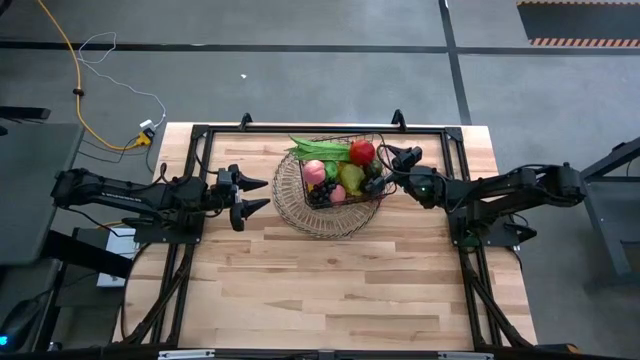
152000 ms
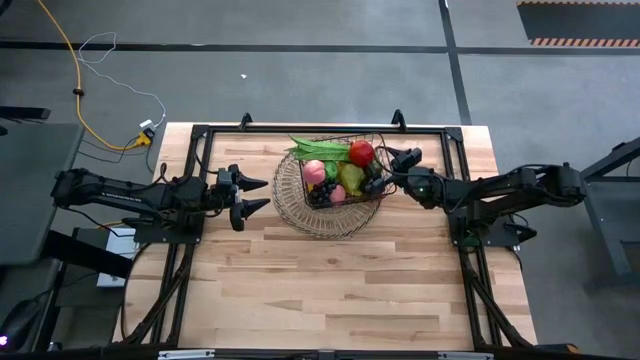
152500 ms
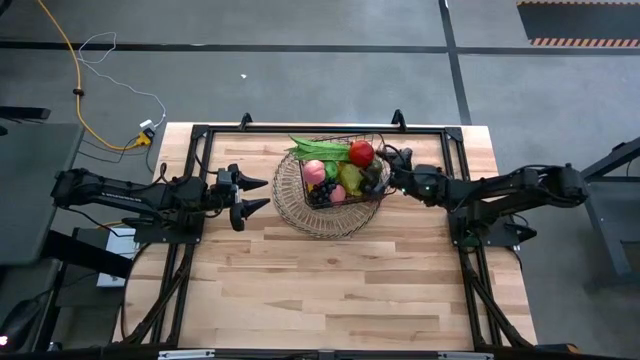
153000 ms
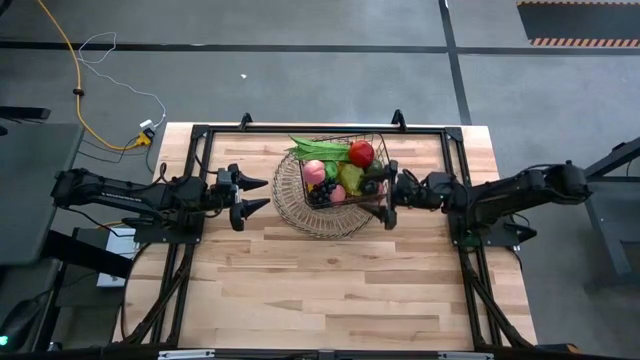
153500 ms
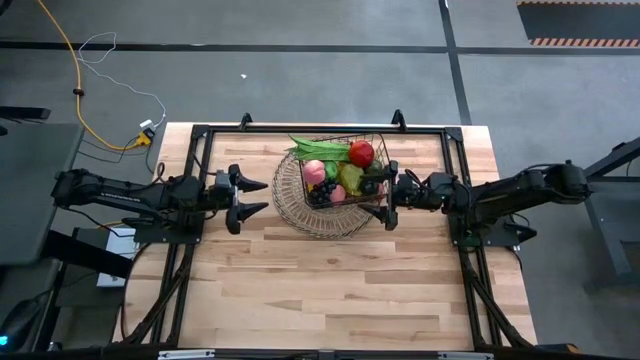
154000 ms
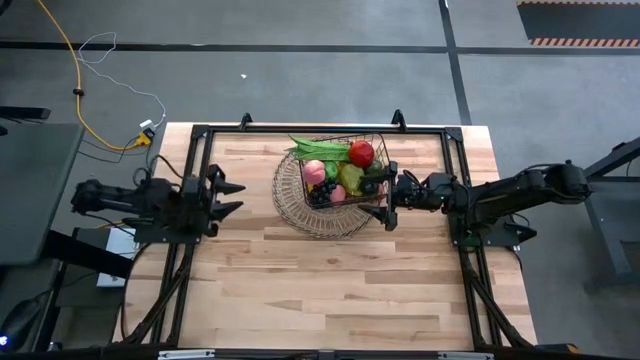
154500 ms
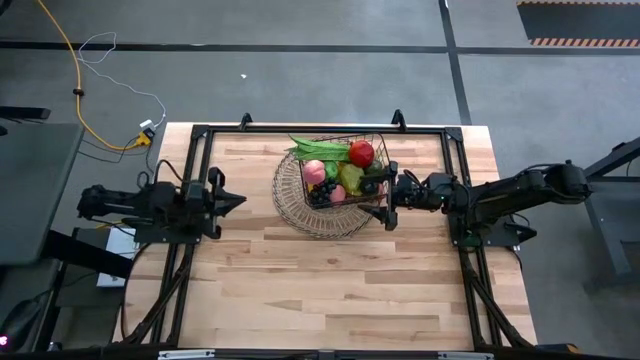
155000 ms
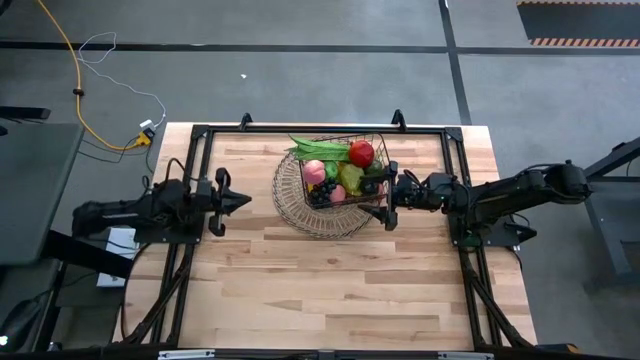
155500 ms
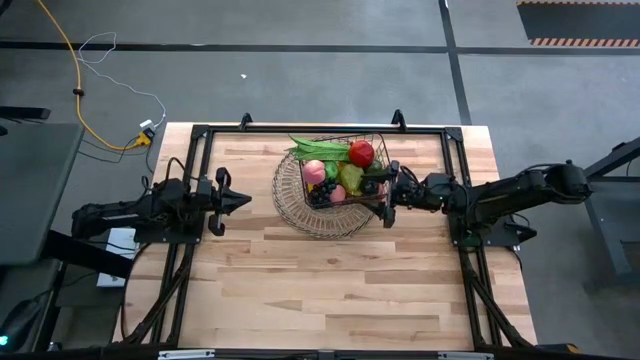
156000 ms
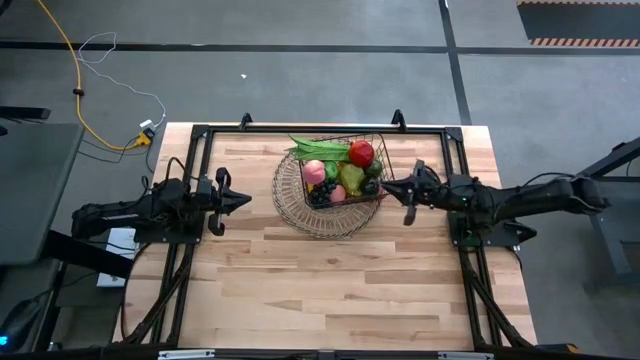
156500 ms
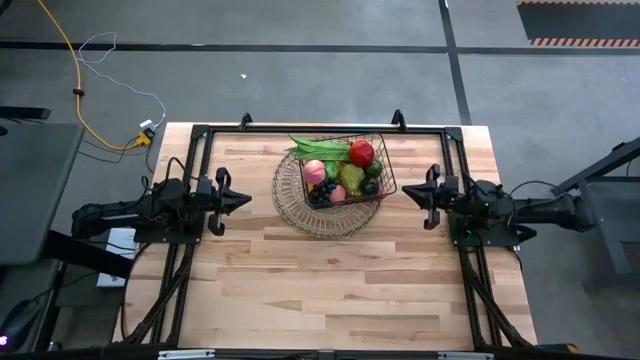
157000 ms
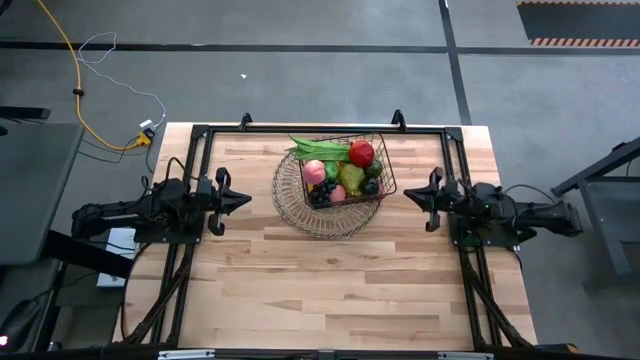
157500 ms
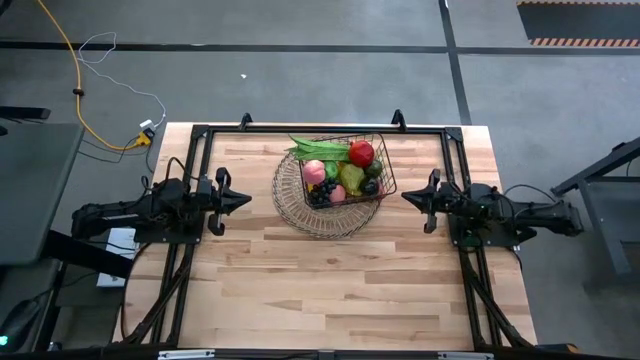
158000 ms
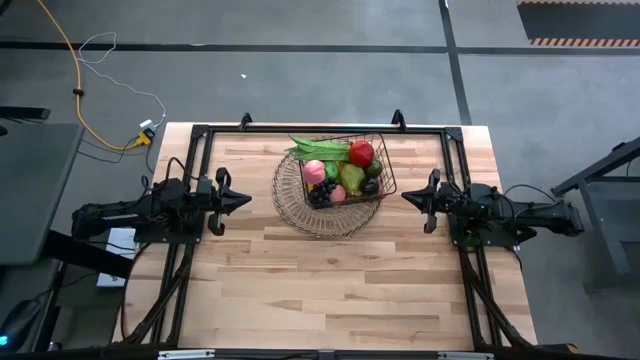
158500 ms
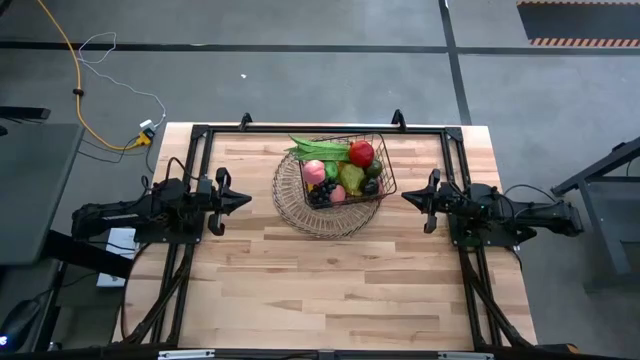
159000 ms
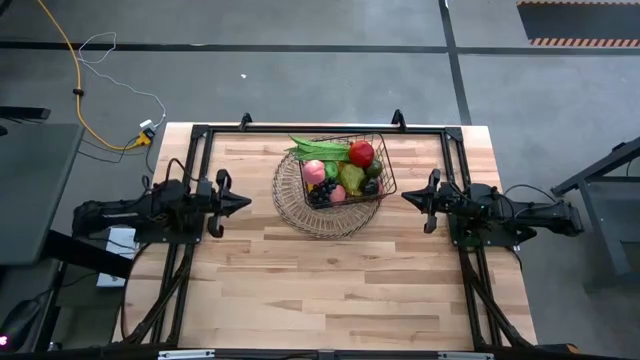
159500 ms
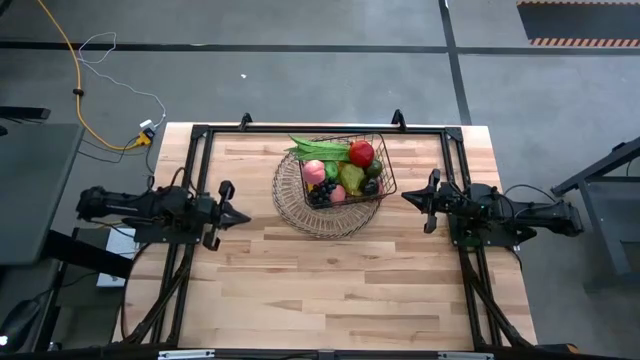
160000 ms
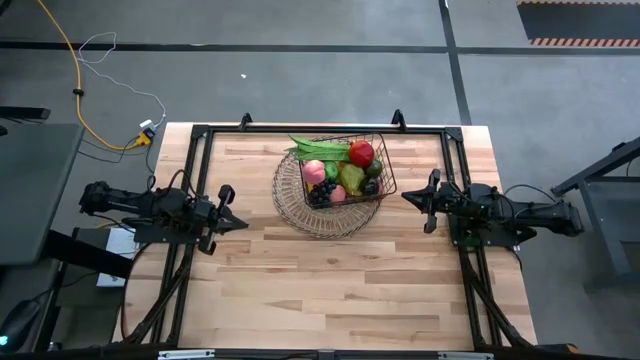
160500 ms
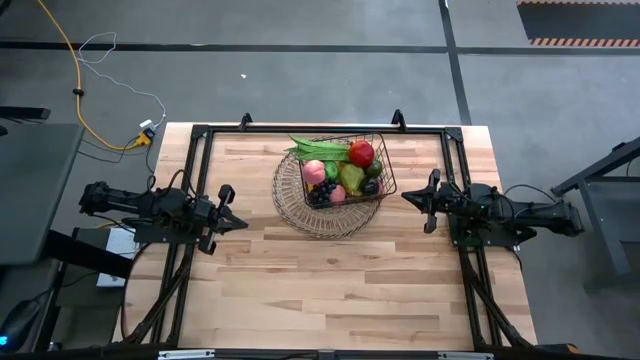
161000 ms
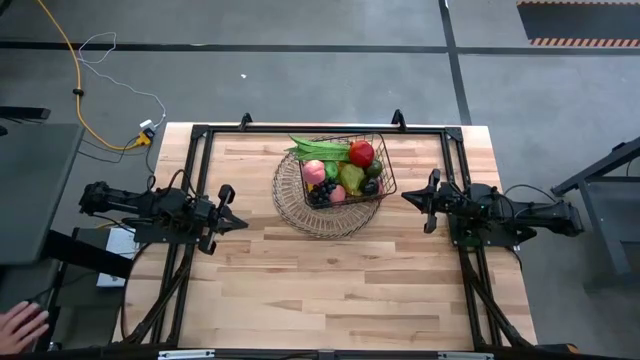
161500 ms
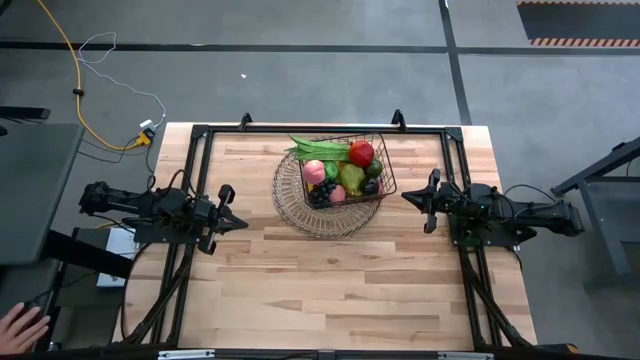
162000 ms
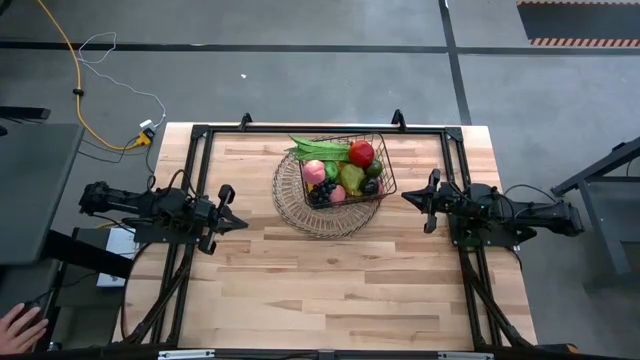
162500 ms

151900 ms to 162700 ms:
Task: Build produce basket
Return to Home Position

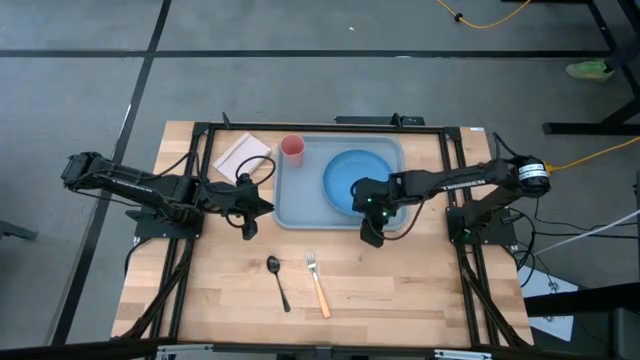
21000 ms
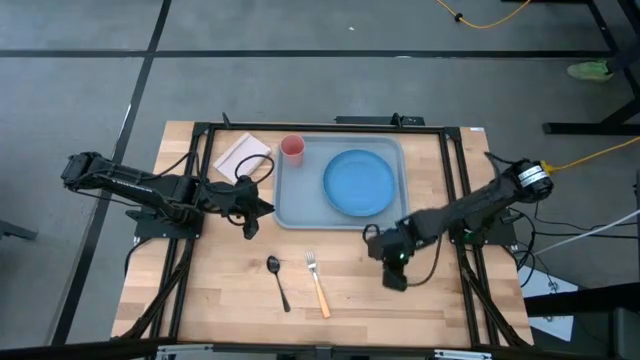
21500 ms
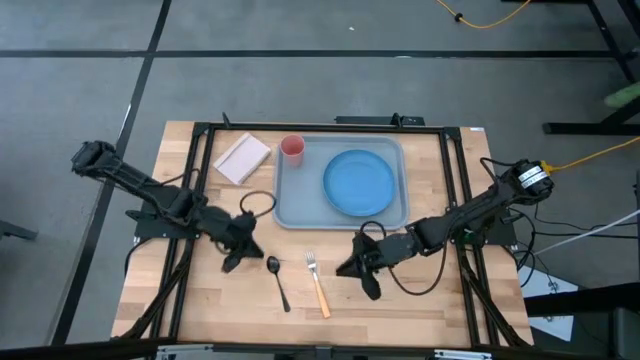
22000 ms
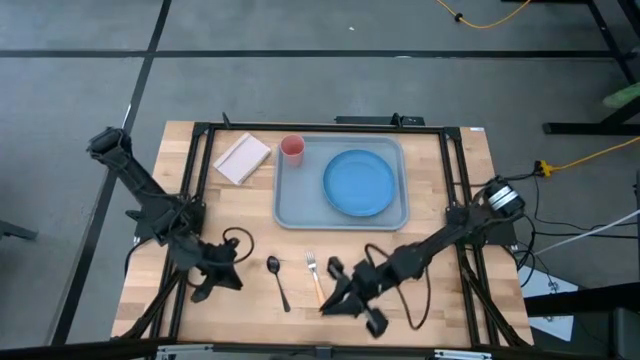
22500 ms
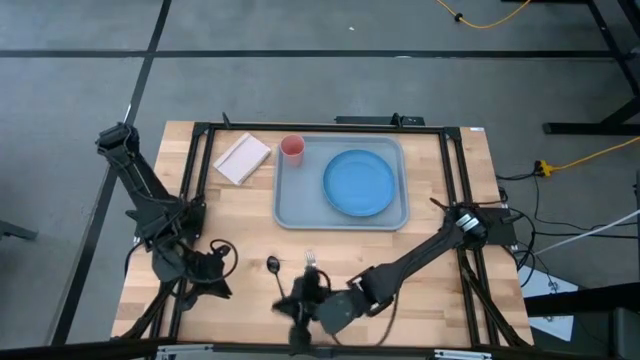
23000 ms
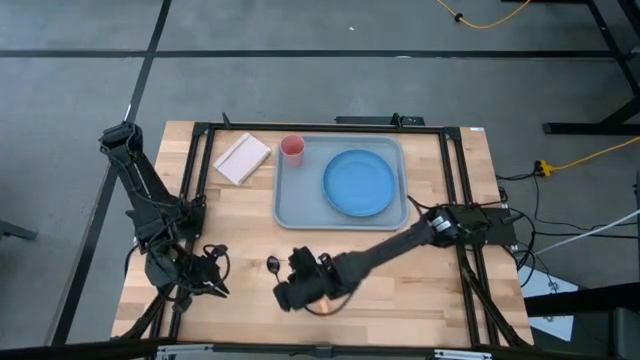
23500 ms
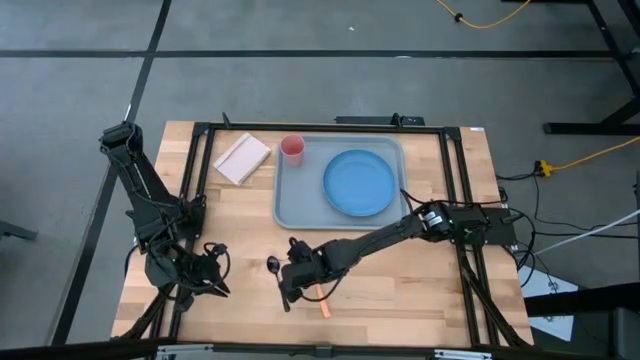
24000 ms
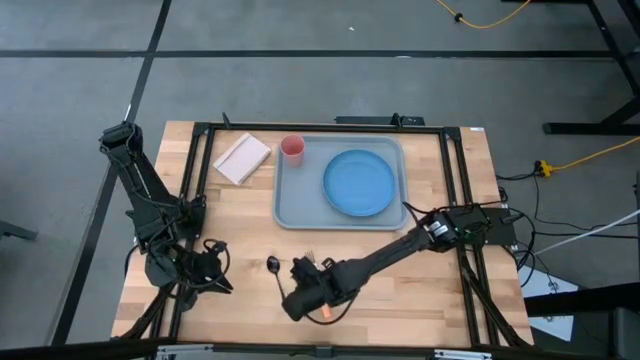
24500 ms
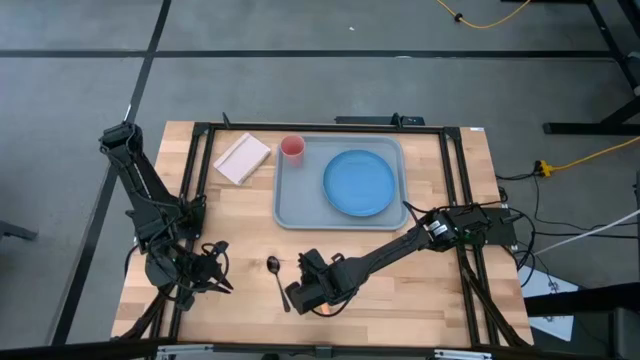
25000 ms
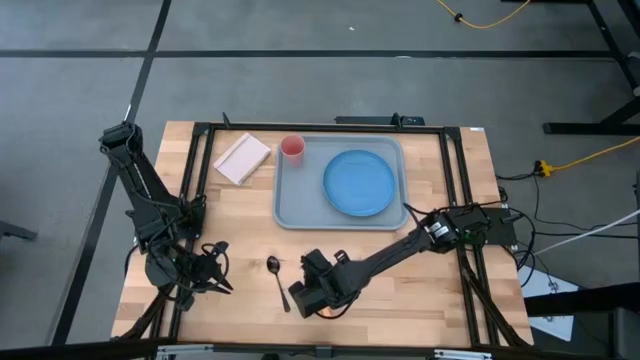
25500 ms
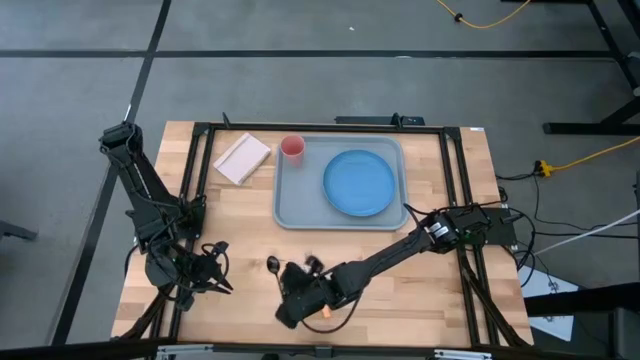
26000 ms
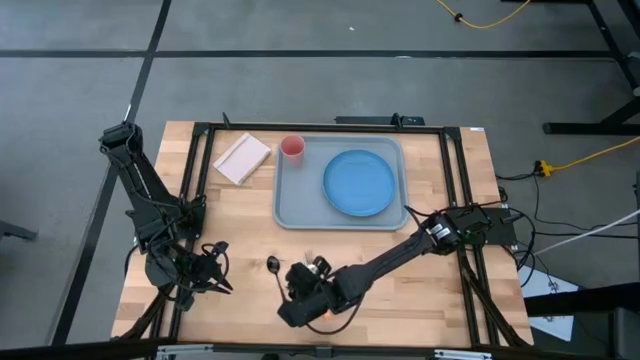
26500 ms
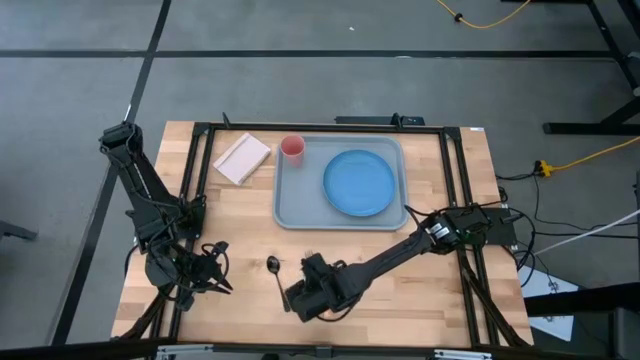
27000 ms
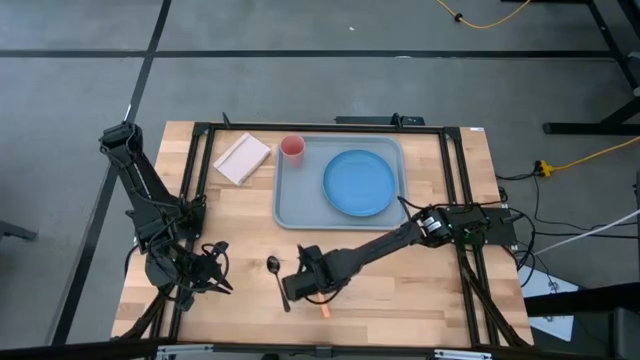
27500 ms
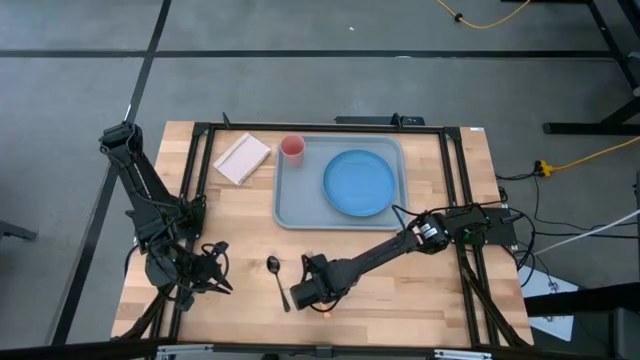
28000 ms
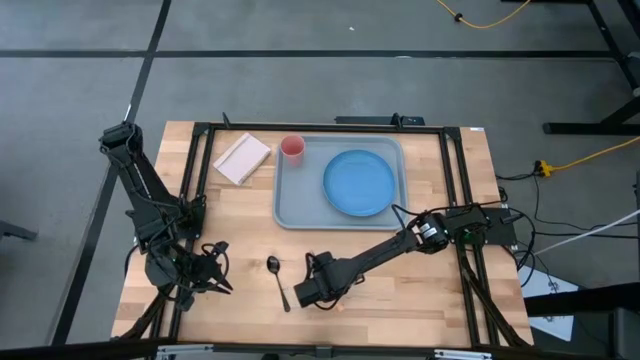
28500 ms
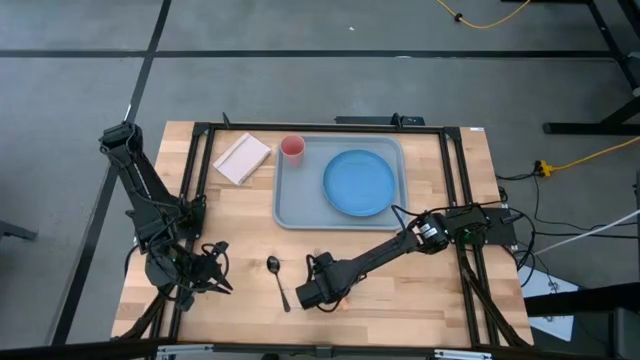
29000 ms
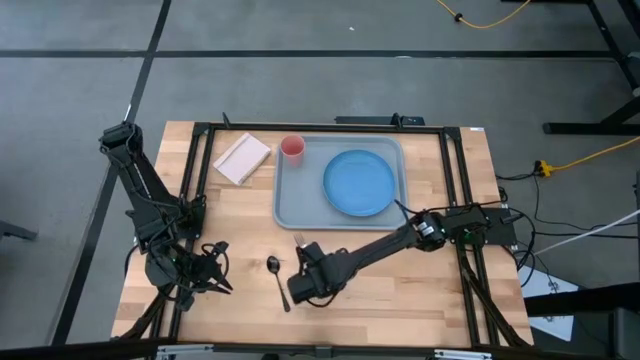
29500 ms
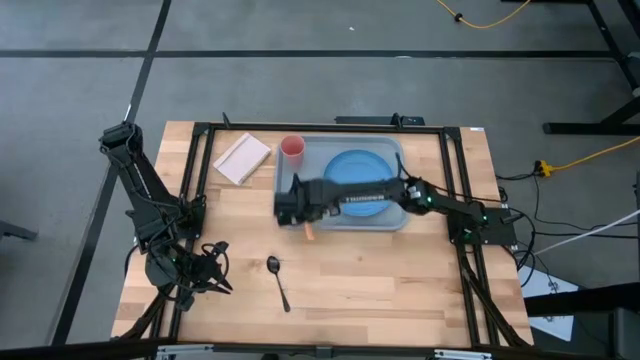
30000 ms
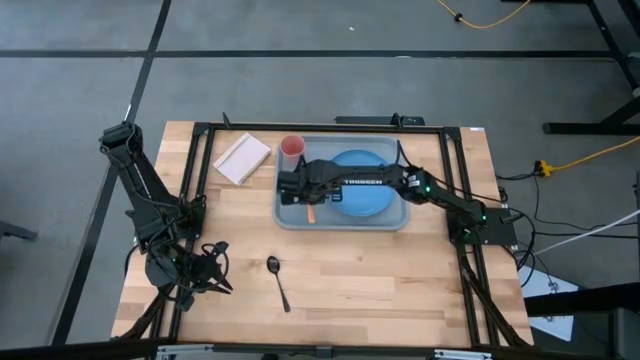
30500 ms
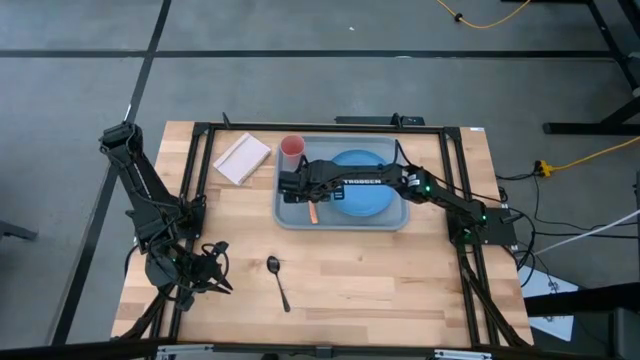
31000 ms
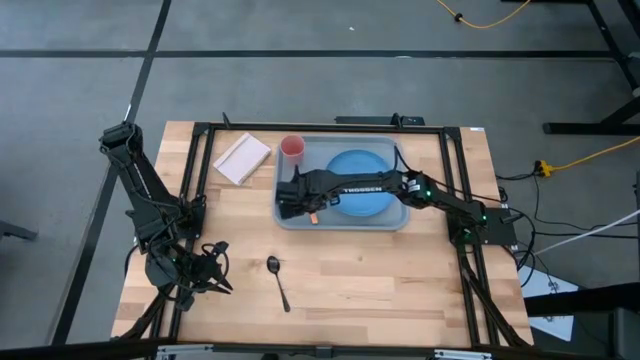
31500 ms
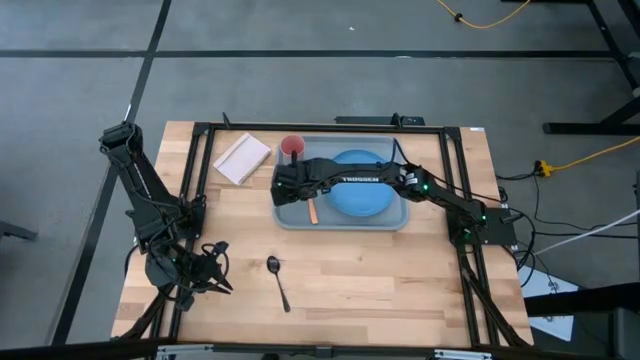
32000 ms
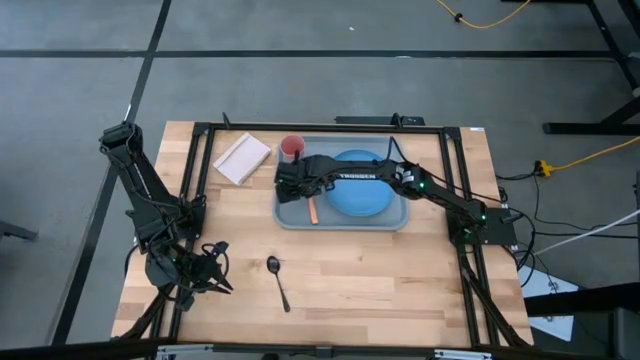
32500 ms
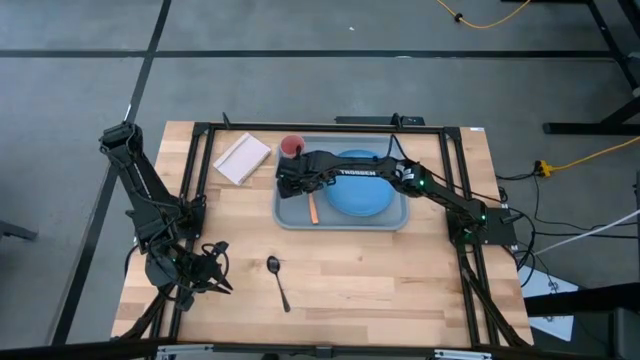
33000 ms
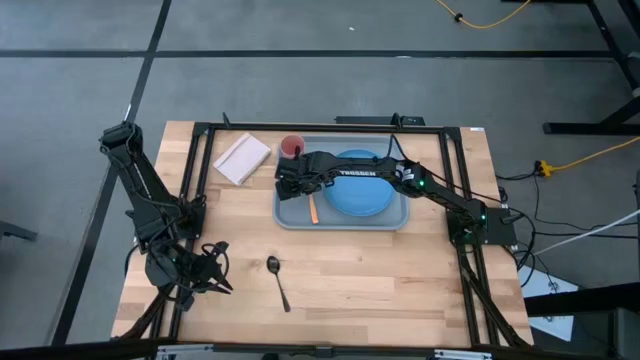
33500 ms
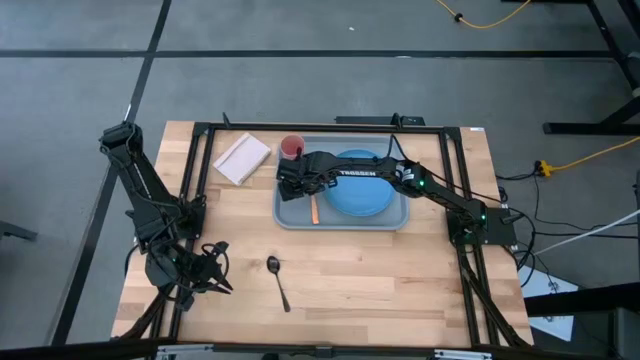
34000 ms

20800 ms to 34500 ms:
Task: Pick and place plate/cup/fork/spoon on tray
Put the orange fork on the gray serving tray to the left of the blue plate
